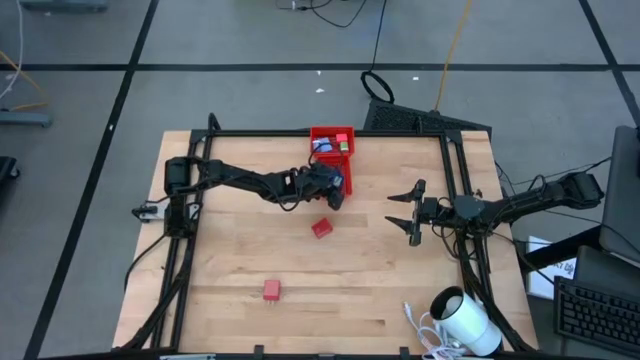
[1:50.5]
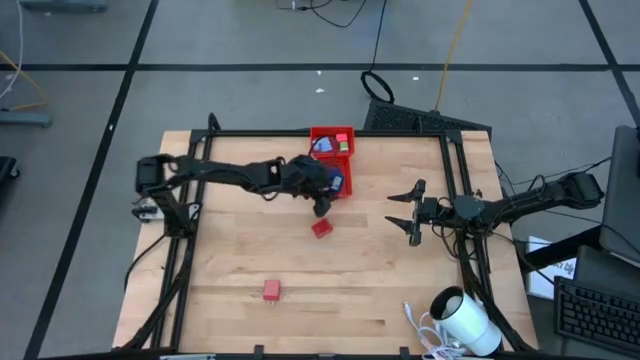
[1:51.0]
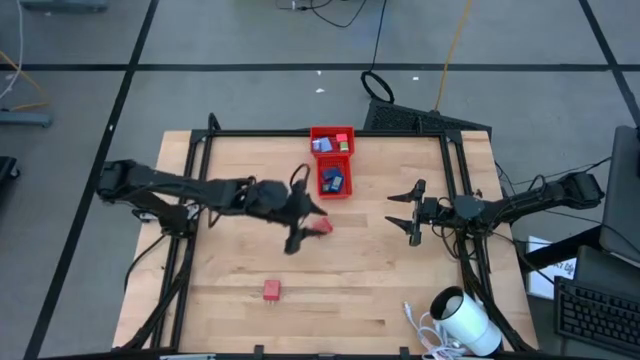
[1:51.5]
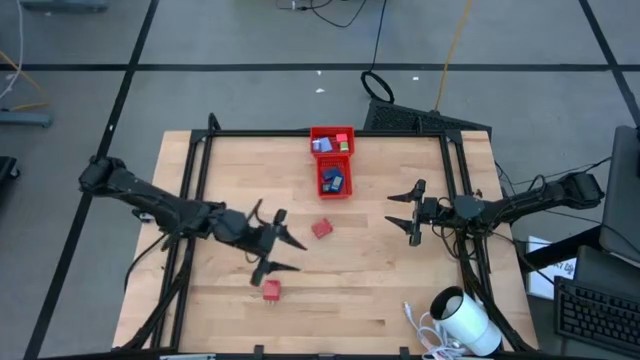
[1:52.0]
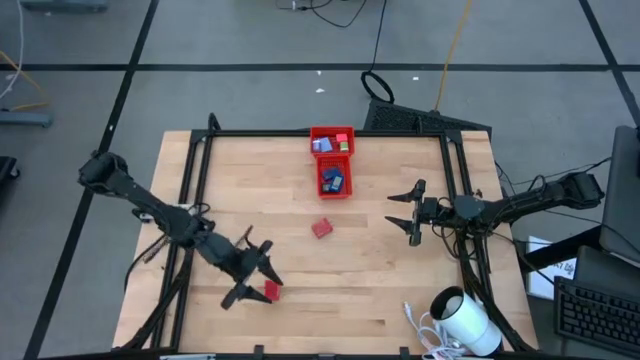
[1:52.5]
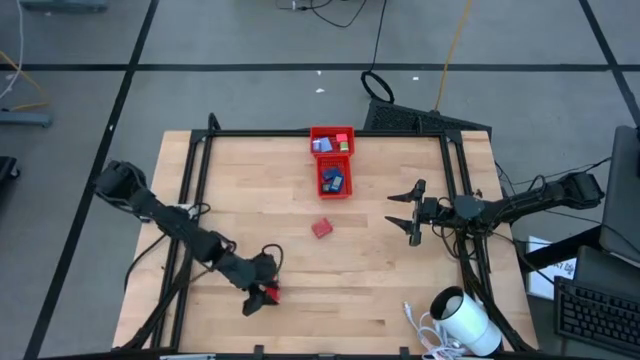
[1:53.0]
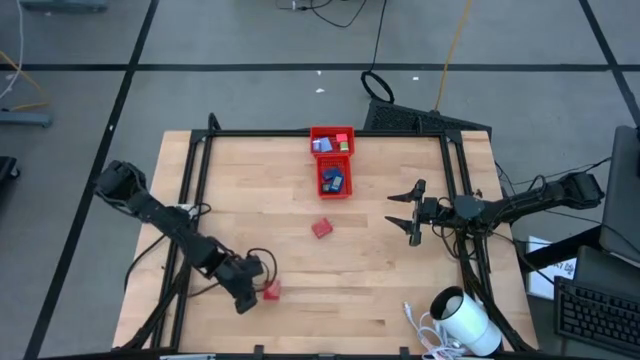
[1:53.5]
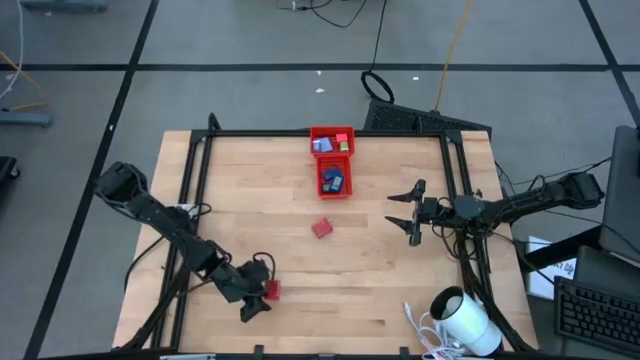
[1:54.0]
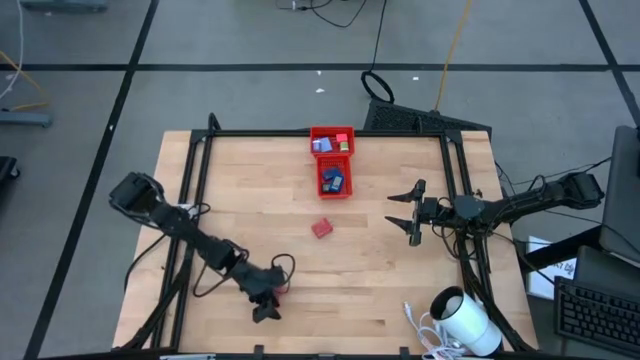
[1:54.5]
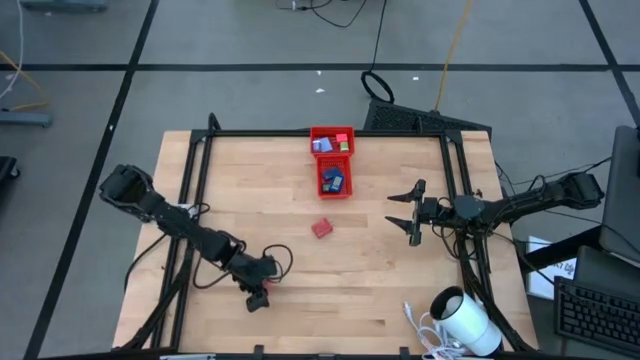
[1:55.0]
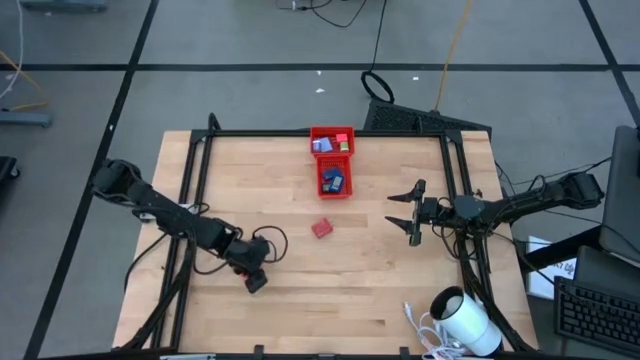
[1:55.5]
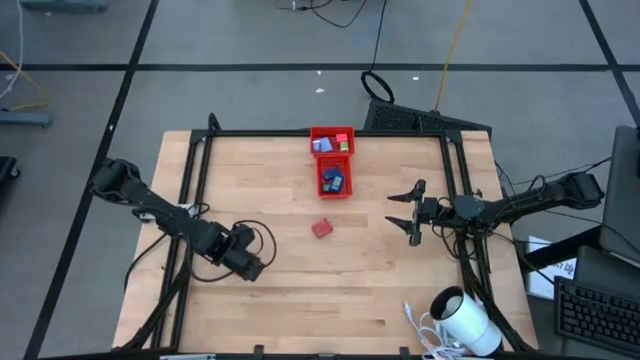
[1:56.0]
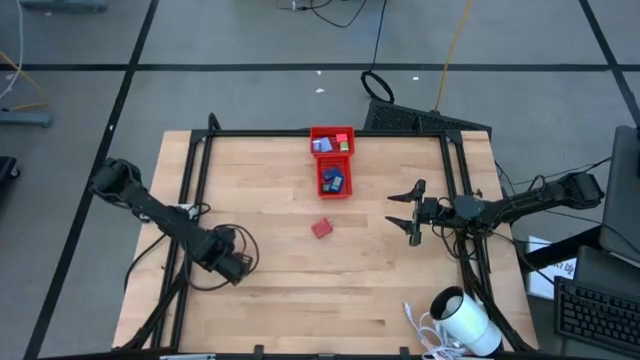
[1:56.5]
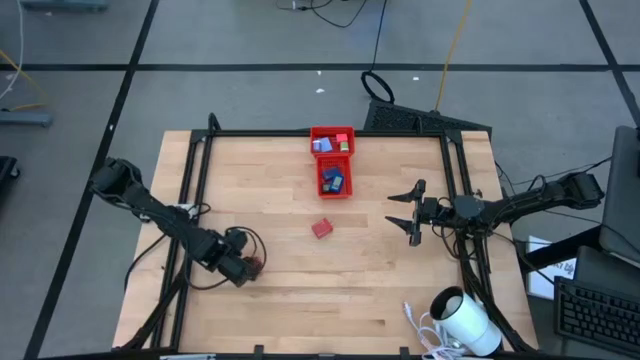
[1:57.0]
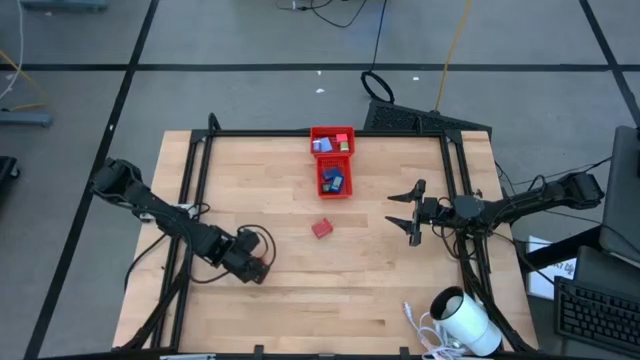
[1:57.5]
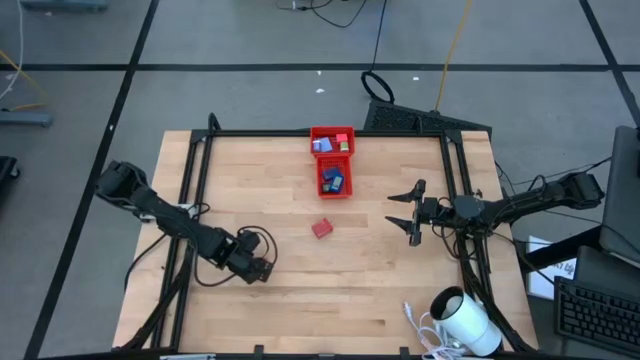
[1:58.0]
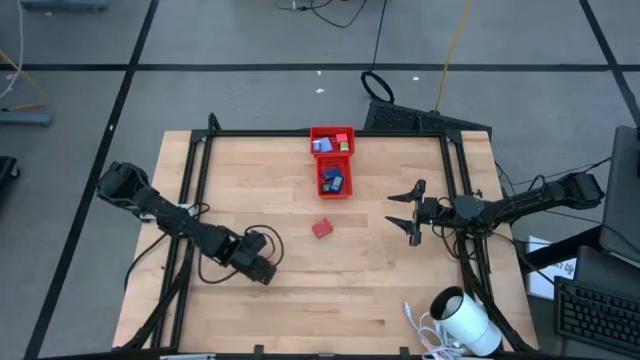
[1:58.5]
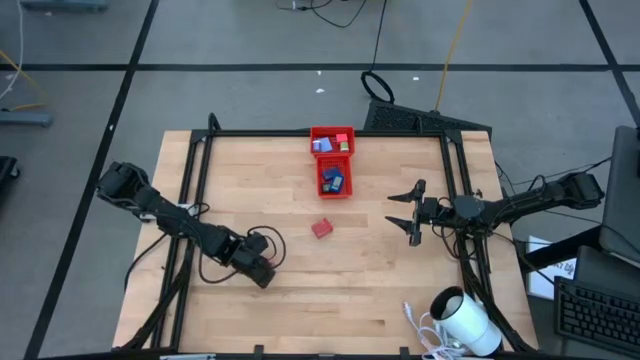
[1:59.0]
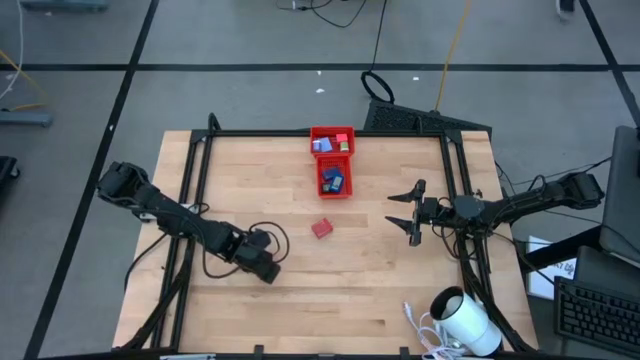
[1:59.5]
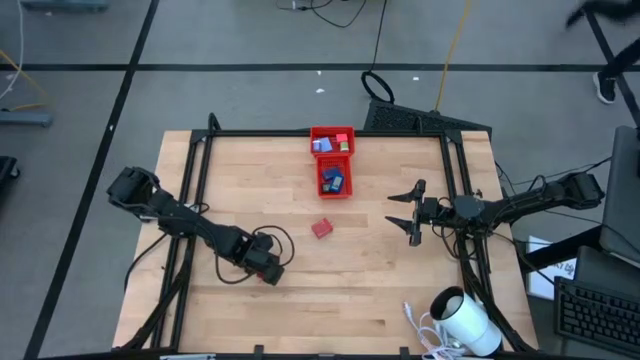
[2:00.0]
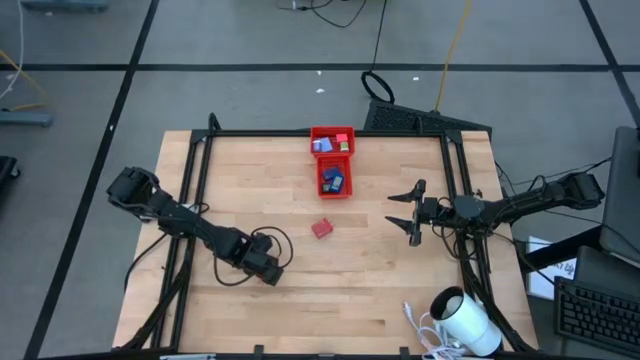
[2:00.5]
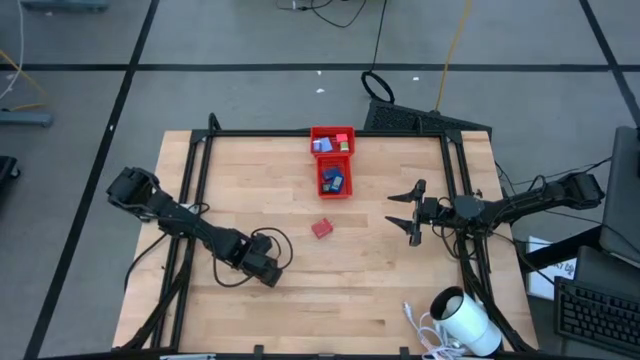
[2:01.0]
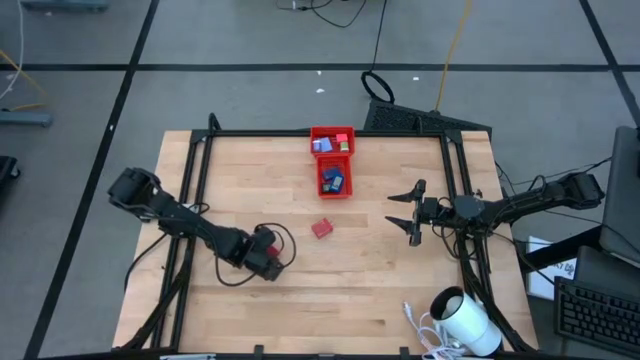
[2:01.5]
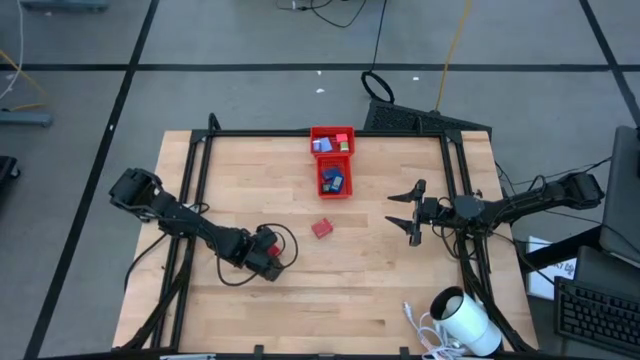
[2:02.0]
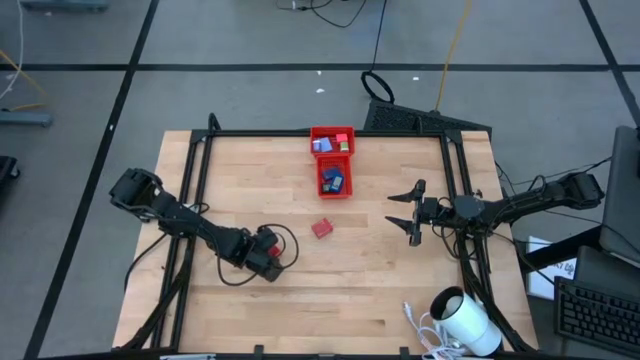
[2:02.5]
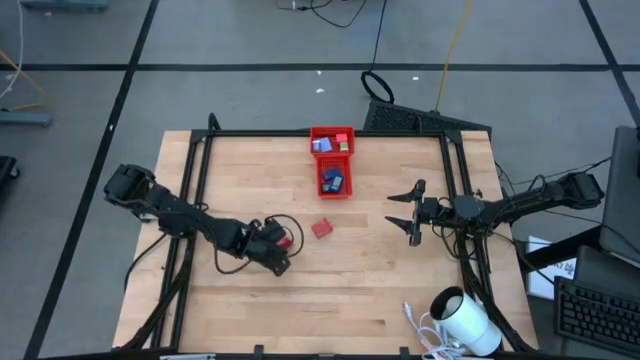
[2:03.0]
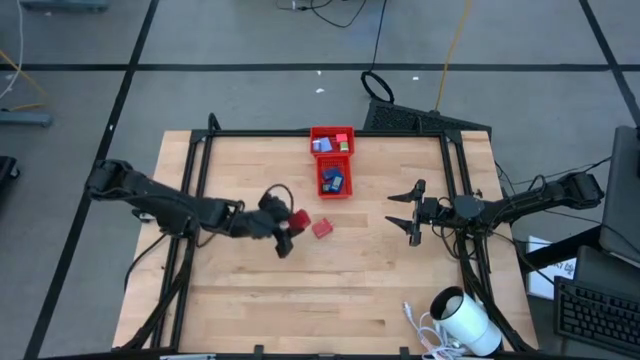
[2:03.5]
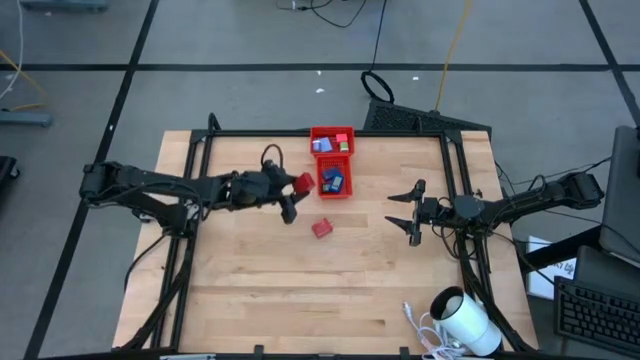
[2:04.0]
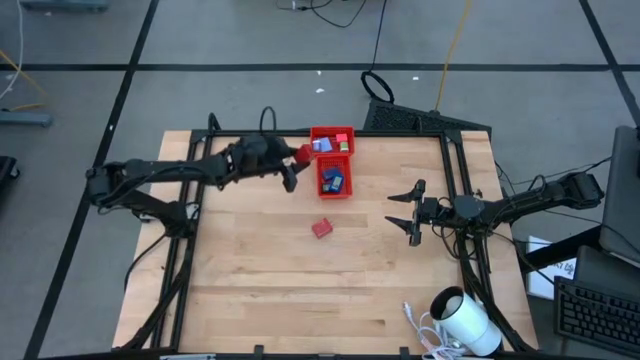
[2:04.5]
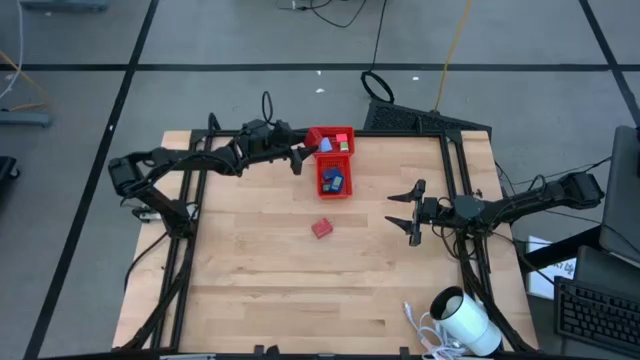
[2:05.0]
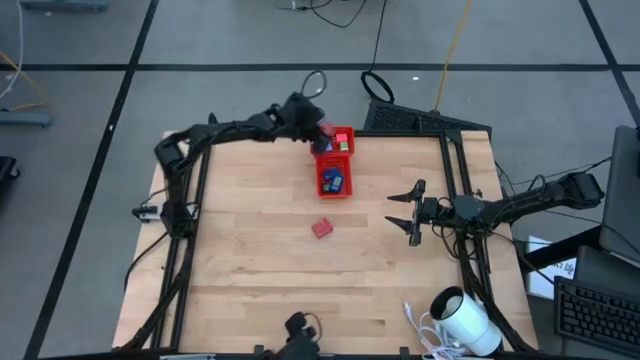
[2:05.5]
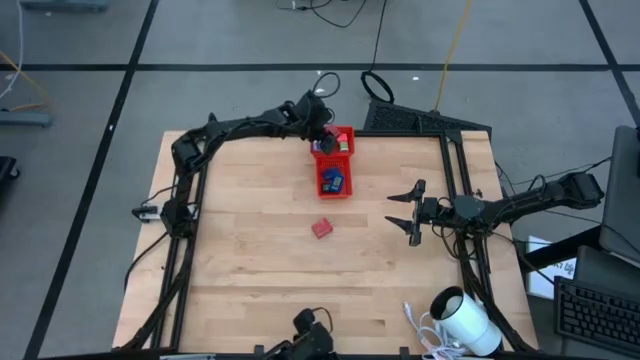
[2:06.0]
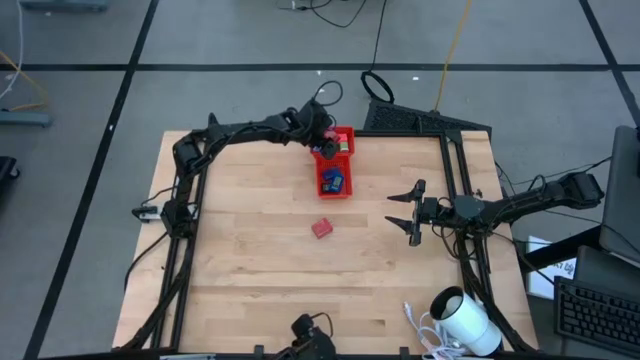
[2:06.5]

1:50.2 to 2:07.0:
Task: Pick & Place Office items
Put the bottom red charger adapter into the top red bin

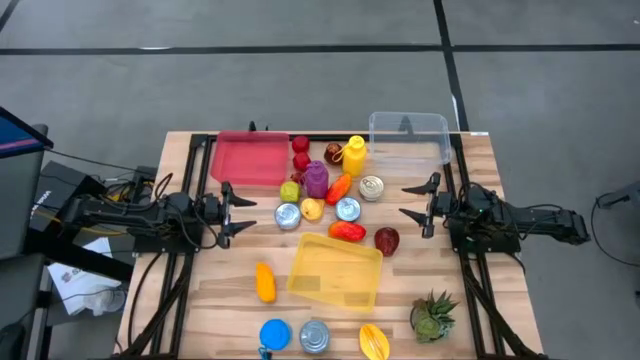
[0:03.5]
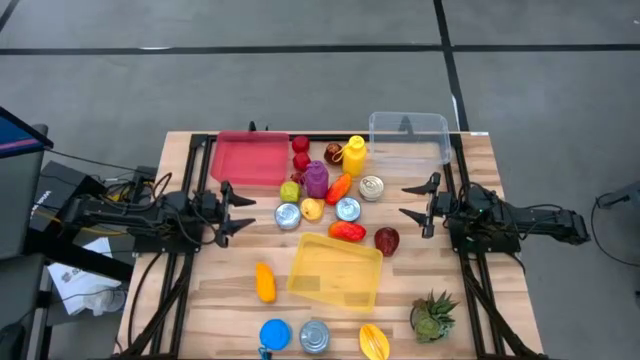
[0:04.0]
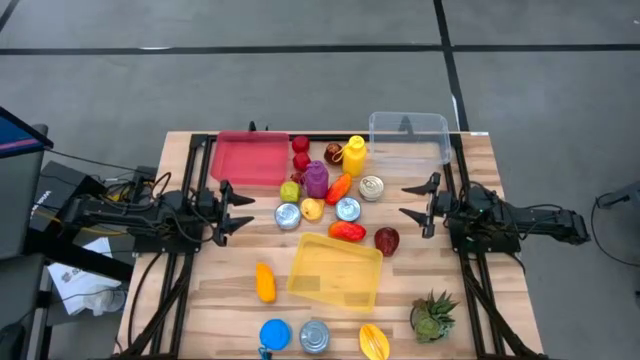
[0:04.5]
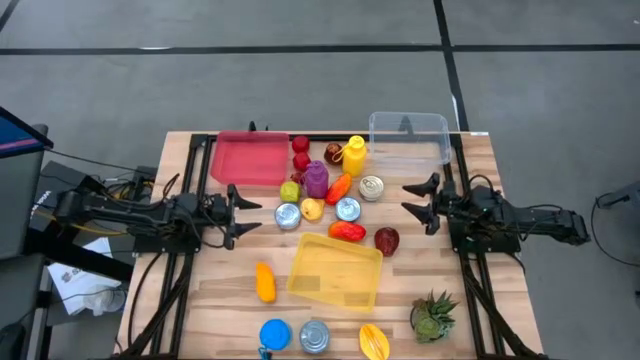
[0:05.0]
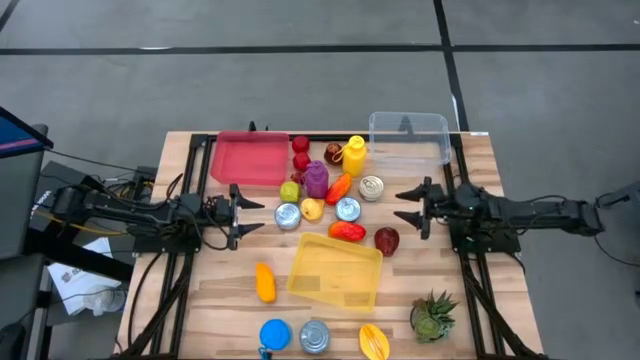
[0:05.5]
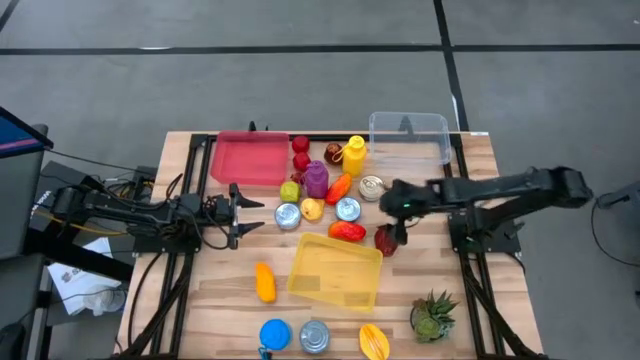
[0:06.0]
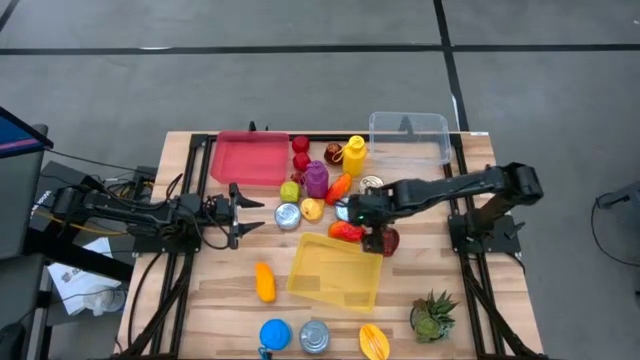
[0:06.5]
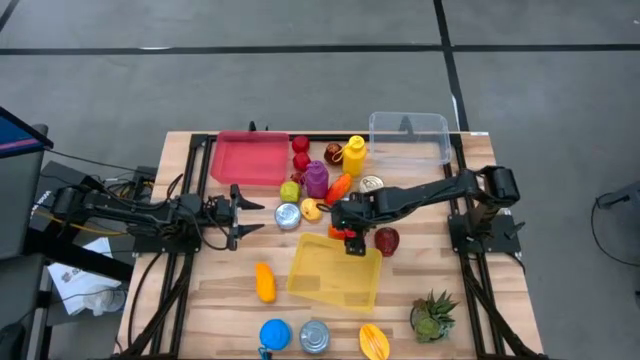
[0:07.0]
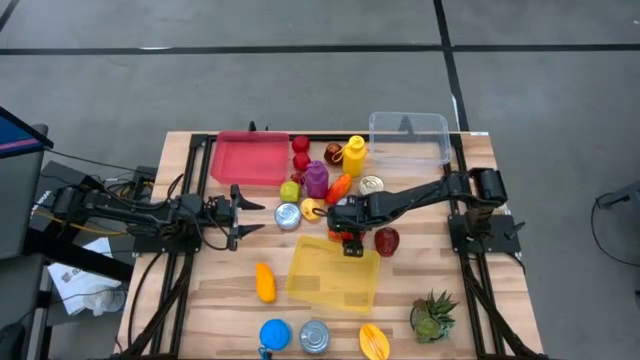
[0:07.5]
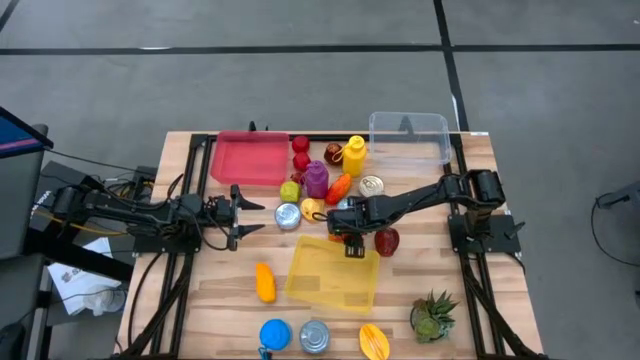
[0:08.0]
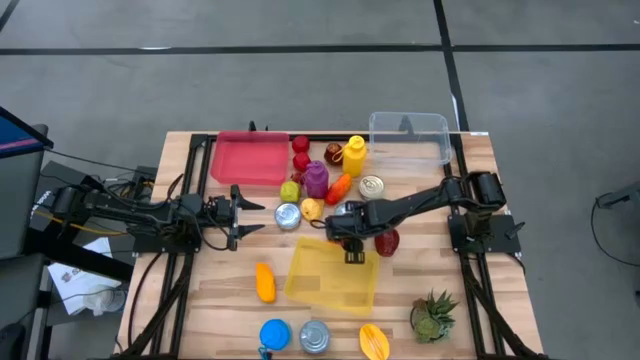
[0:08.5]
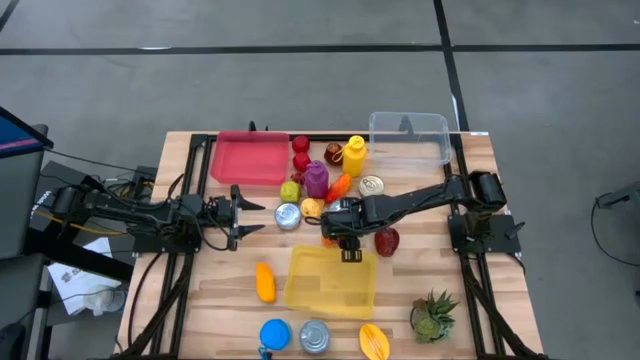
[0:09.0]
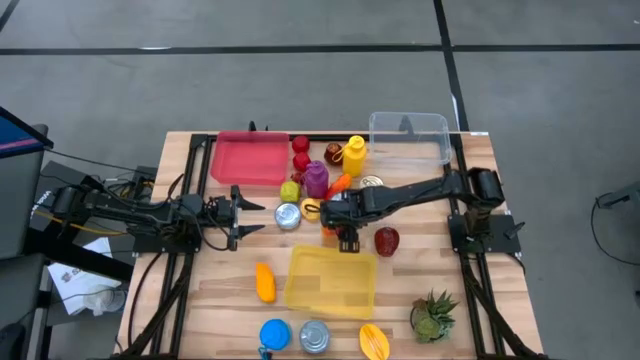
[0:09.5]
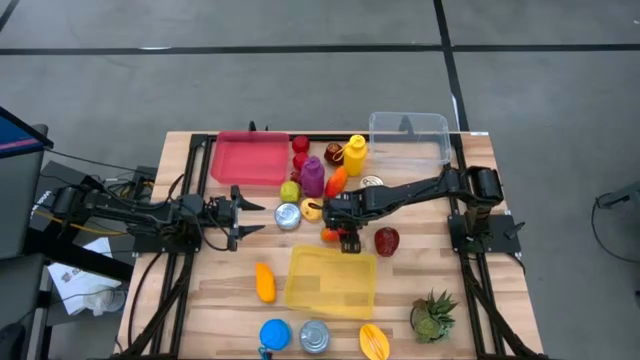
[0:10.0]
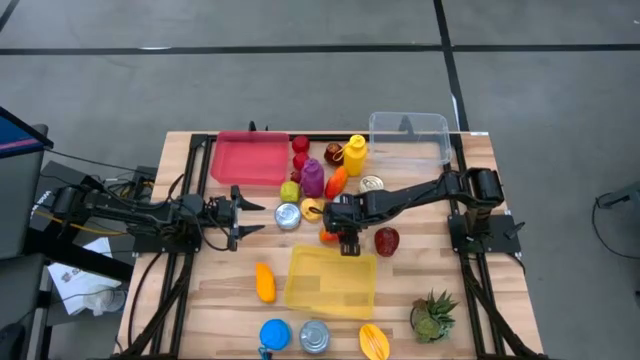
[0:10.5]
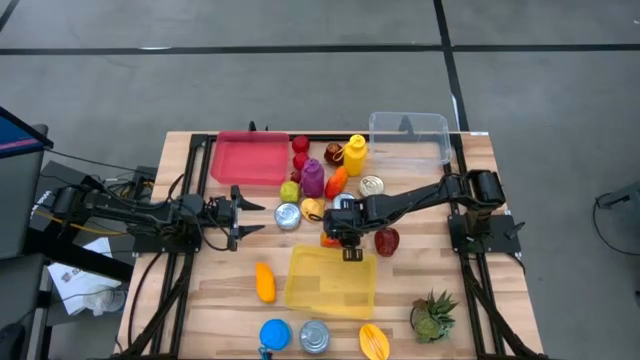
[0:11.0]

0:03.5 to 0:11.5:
Task: Pick & Place Food Item
Put the bottom mango into the transparent bin
